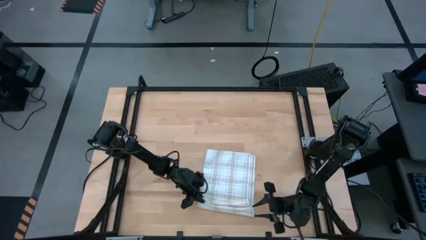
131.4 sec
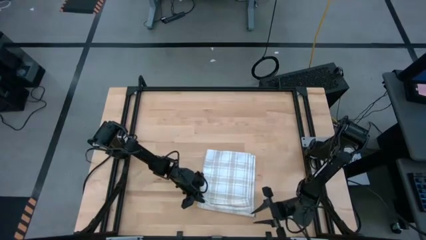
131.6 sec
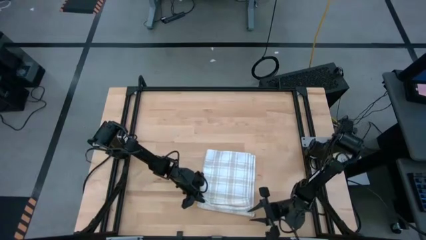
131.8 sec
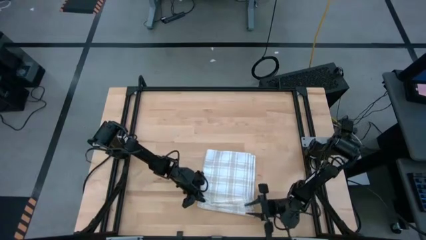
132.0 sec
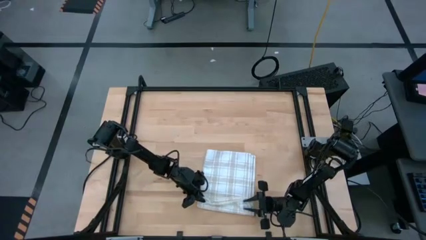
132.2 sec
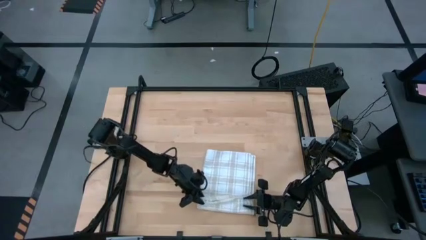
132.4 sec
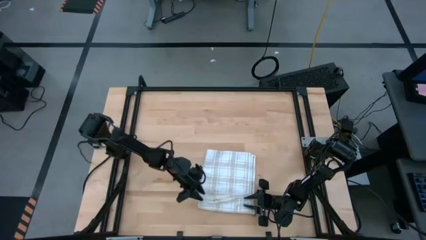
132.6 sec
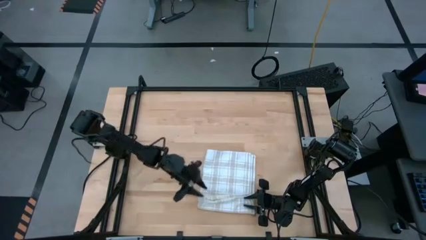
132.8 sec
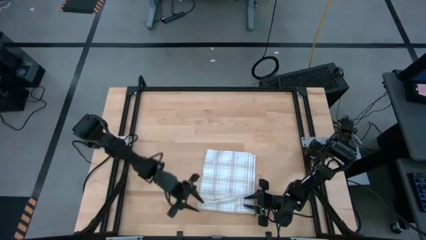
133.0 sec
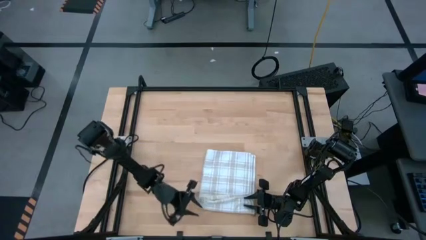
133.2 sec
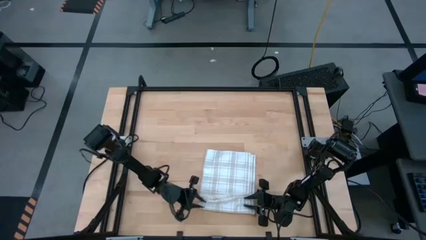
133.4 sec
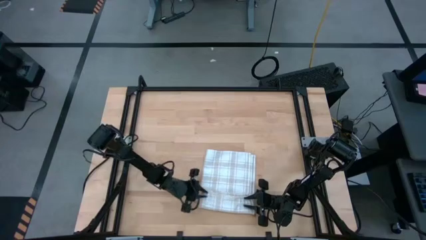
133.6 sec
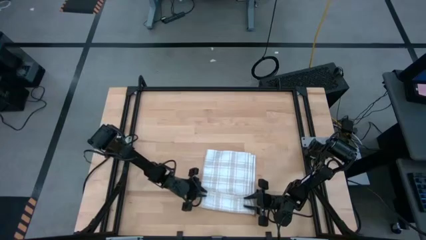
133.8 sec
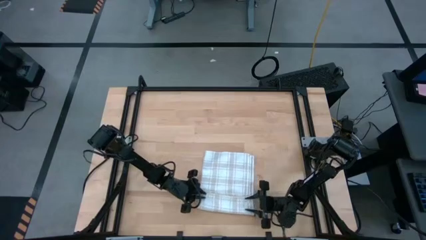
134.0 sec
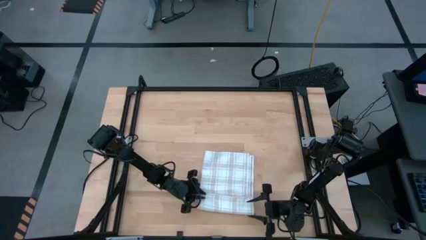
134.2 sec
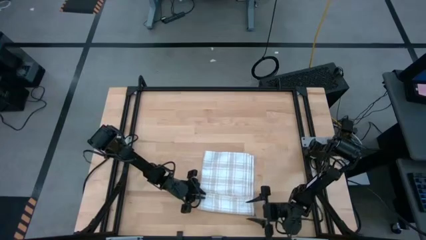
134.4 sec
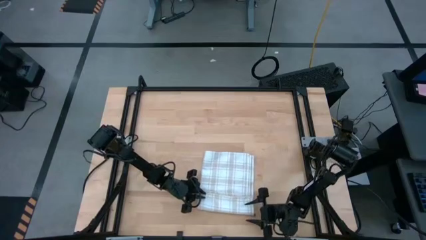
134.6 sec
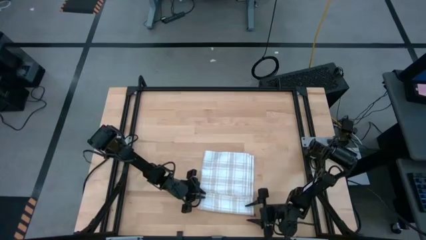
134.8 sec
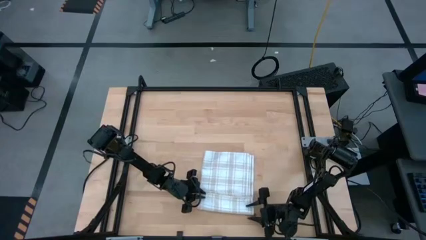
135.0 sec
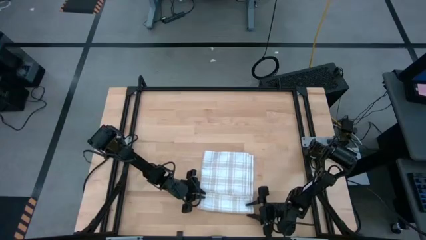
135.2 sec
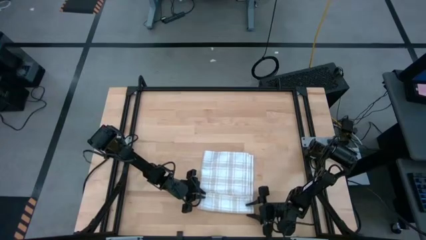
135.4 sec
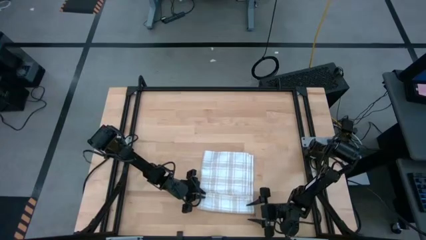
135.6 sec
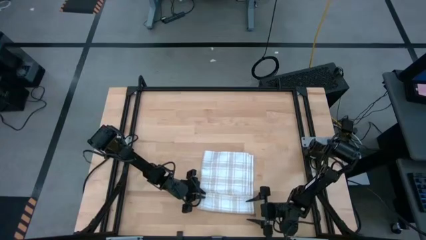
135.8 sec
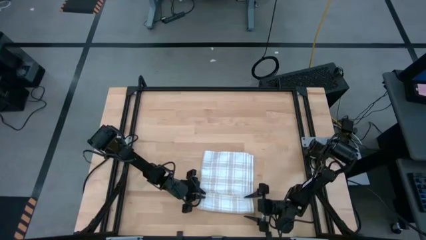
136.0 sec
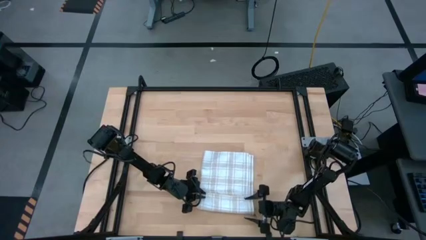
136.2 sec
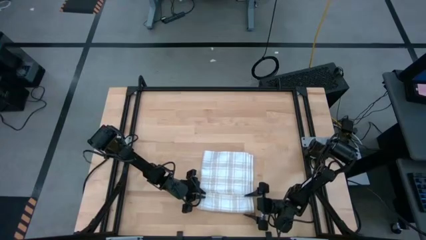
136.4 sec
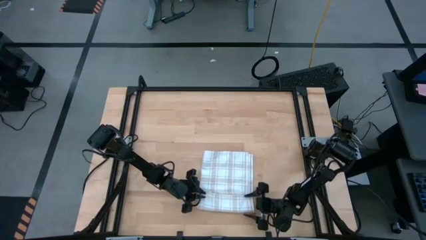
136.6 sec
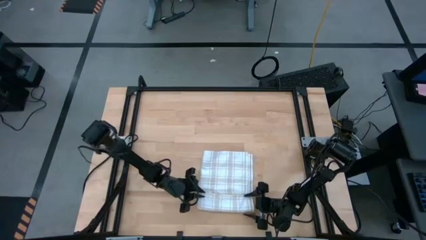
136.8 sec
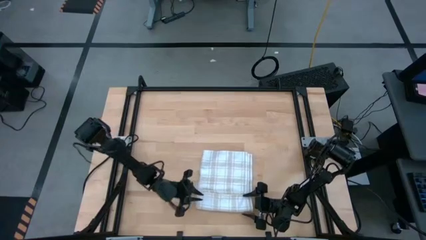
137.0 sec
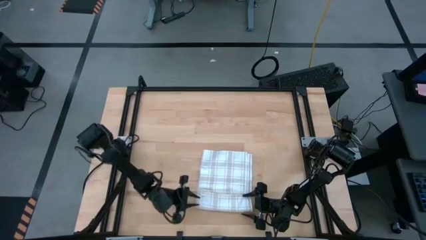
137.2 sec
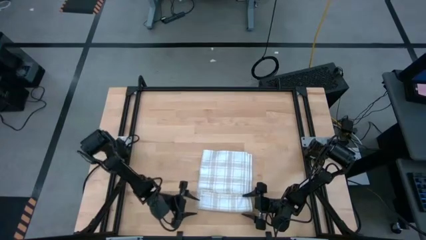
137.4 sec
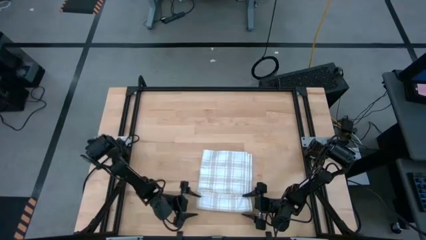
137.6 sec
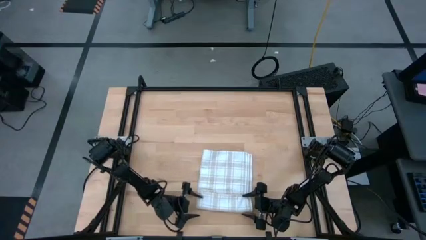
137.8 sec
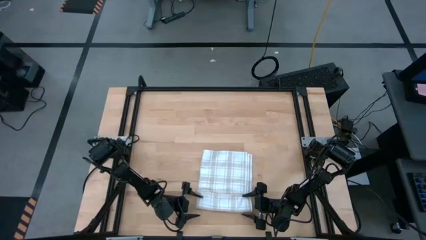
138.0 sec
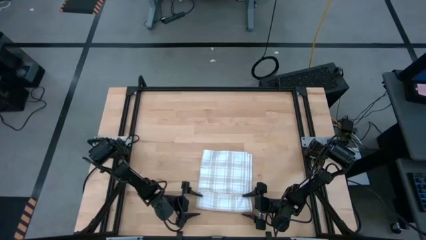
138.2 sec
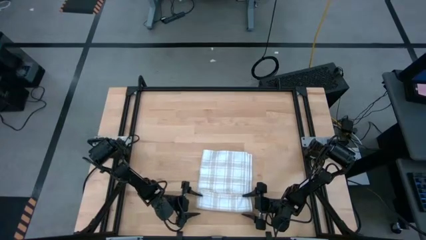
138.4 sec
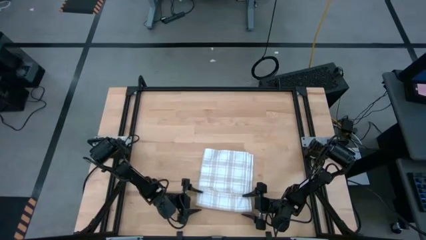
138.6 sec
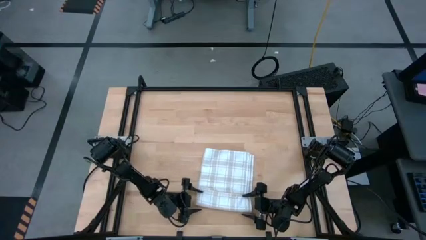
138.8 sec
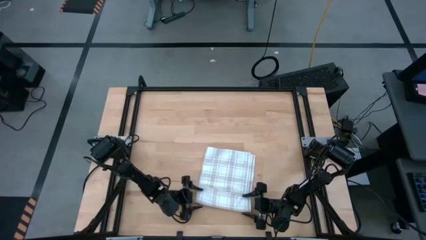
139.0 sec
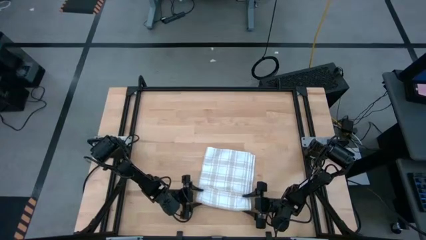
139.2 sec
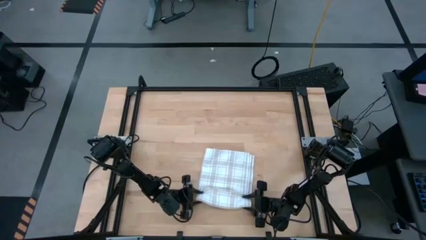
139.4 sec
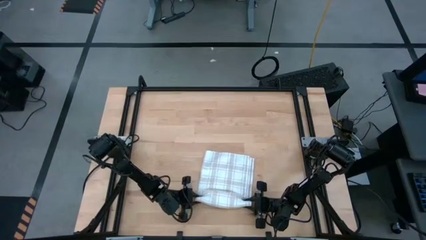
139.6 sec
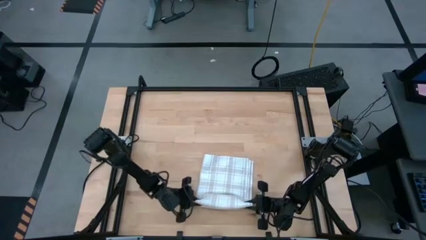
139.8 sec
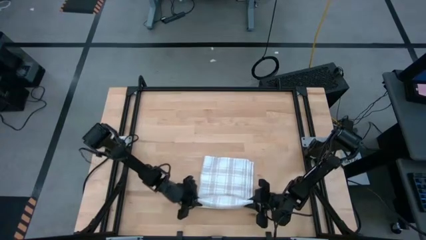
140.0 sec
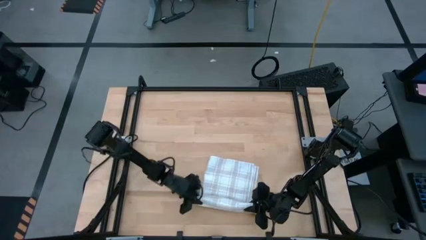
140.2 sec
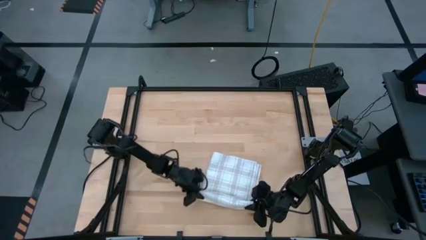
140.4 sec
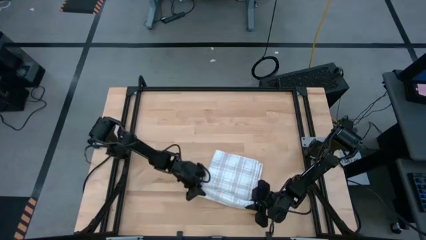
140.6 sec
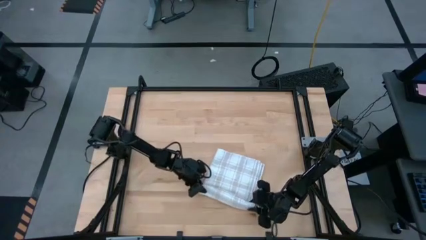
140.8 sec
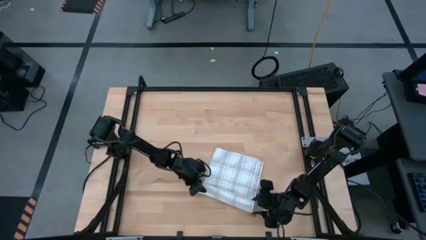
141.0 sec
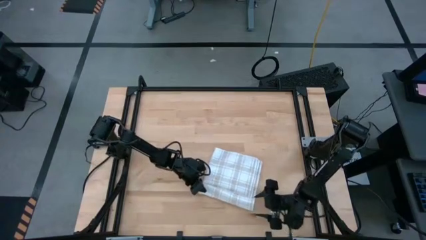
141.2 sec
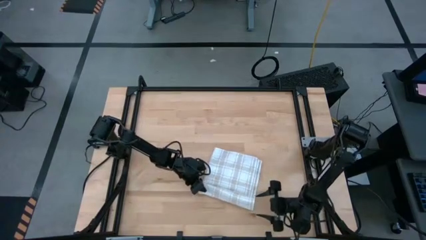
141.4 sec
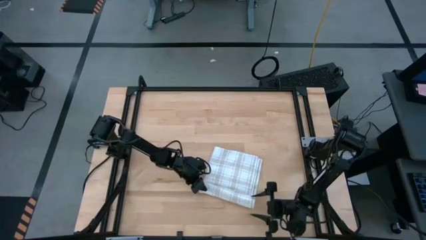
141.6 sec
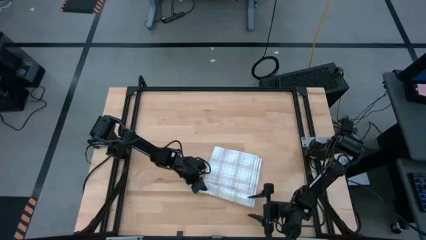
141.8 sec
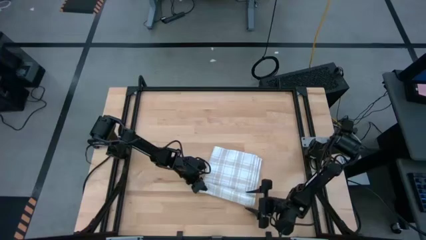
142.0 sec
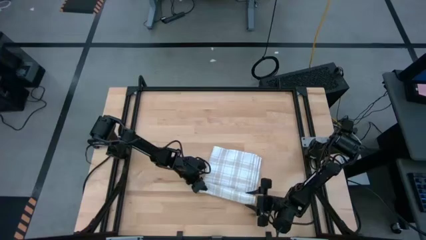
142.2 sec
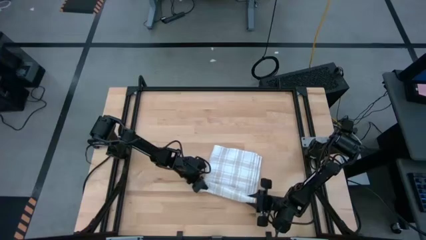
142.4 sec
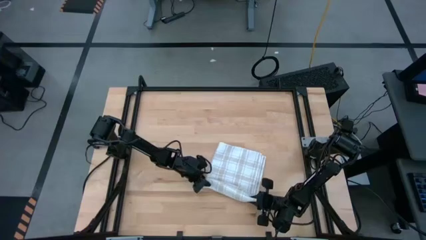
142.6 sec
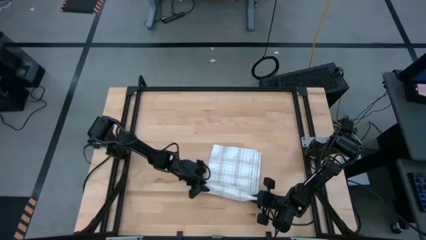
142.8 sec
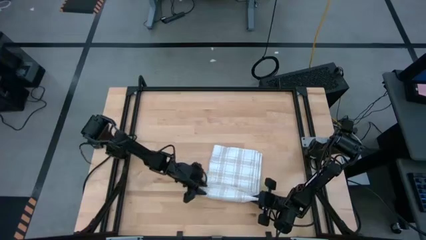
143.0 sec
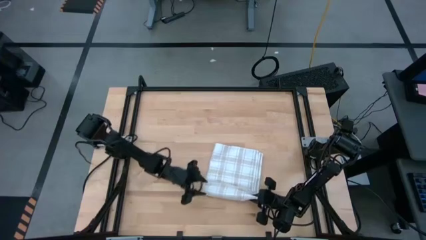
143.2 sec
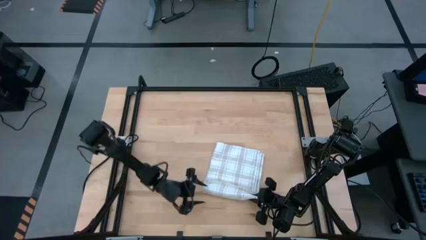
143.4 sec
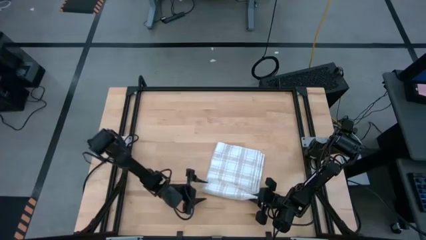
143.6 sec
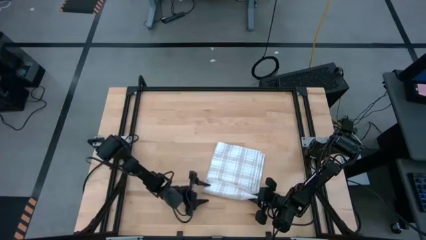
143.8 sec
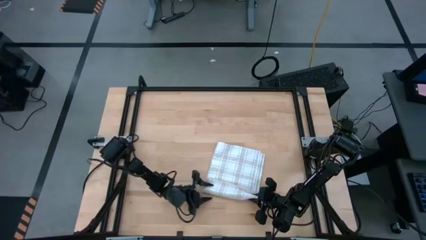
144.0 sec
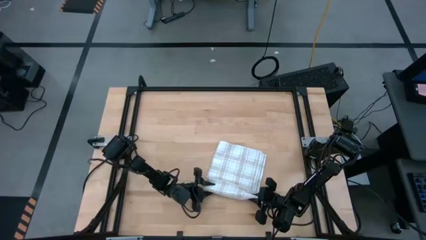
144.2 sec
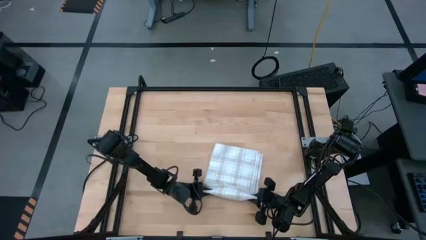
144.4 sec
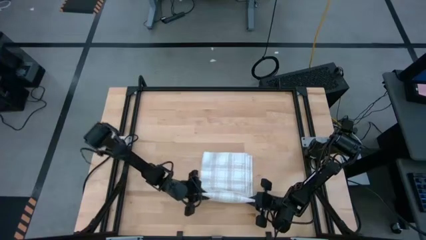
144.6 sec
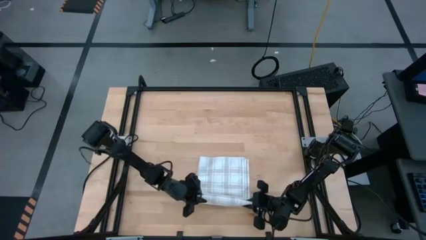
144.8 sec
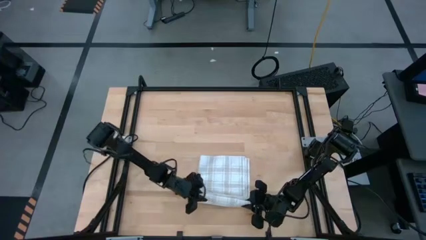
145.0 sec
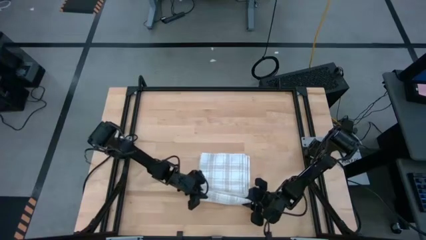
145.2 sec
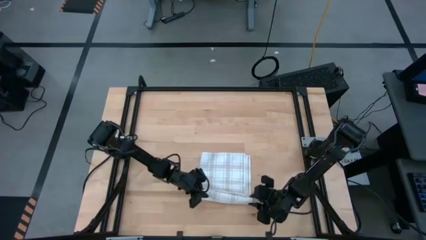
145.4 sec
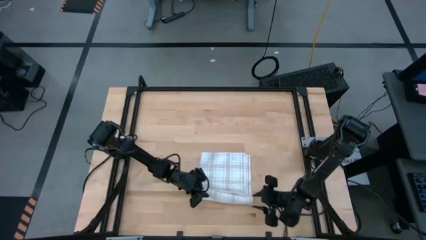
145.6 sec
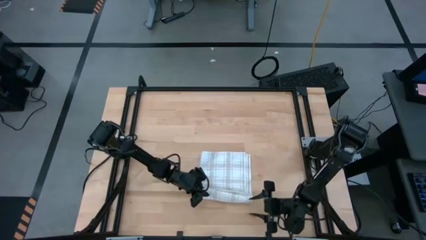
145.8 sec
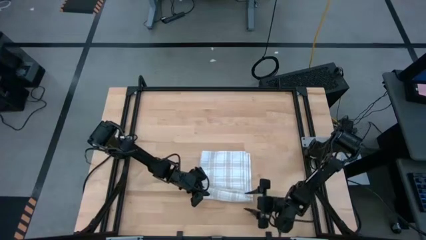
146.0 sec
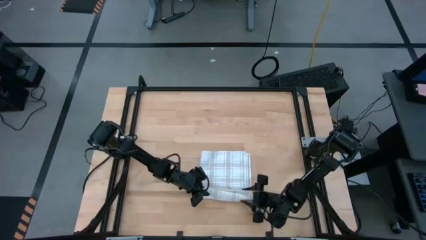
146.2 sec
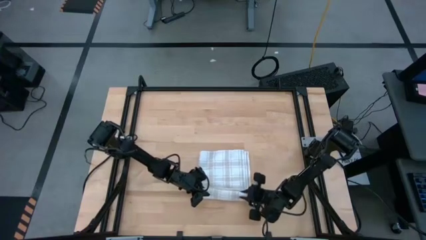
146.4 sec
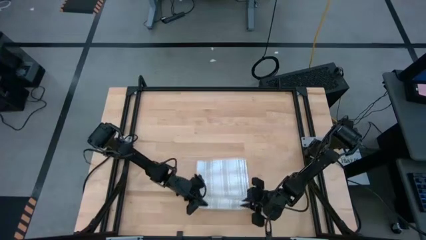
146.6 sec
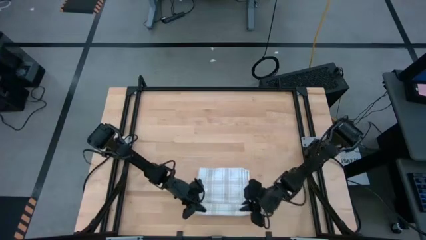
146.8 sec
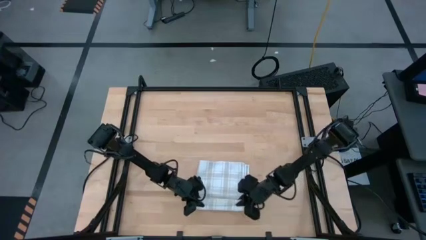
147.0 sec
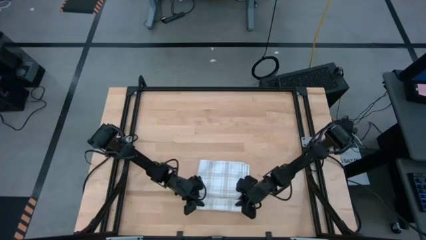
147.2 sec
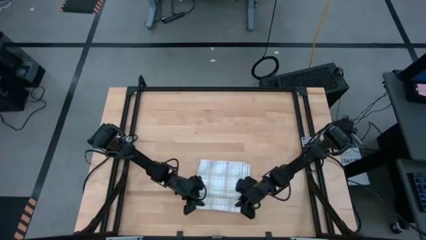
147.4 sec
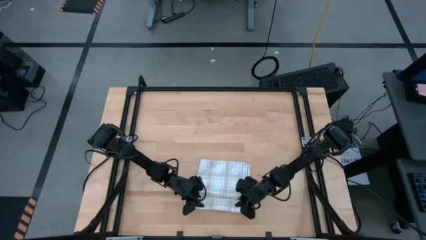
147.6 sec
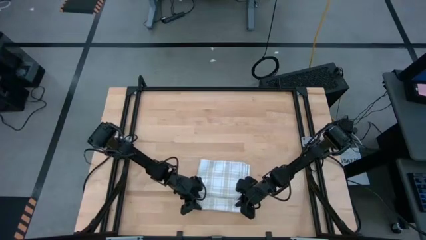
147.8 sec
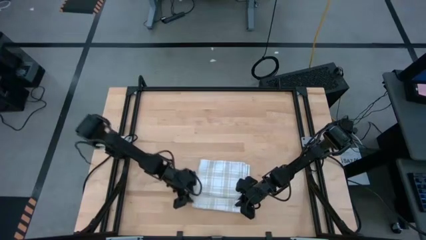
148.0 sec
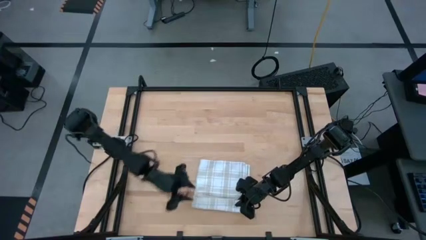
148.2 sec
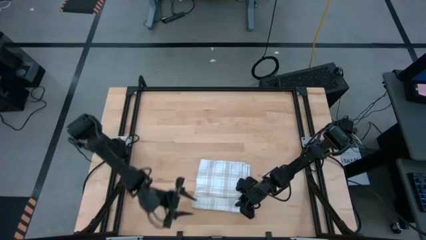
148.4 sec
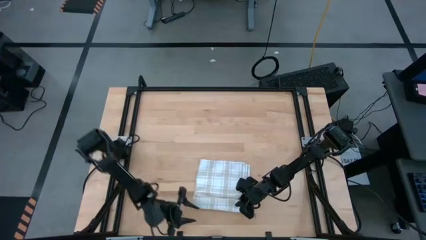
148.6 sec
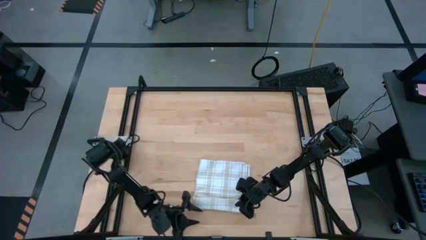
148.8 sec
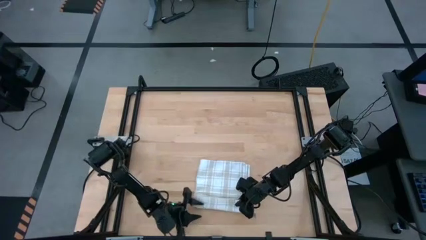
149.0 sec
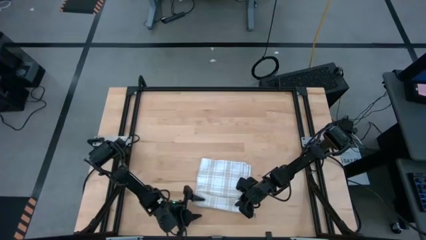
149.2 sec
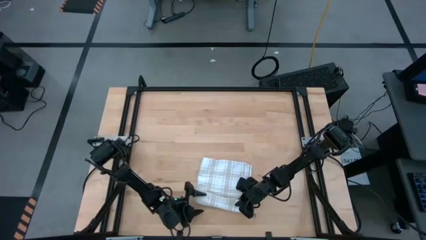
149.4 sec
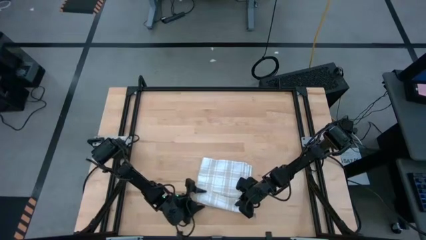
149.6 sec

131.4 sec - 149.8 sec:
Task: Roll towel
Roll the white towel
